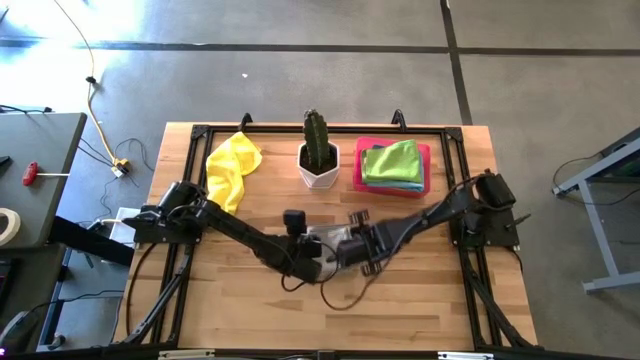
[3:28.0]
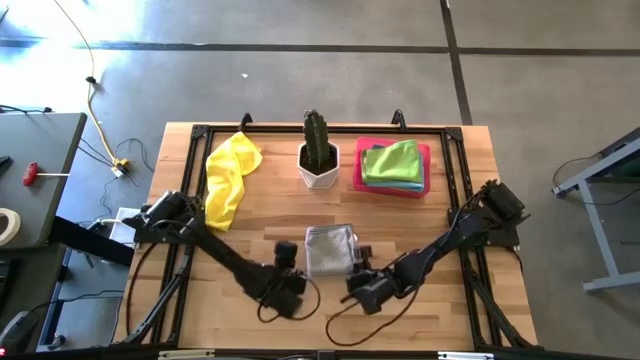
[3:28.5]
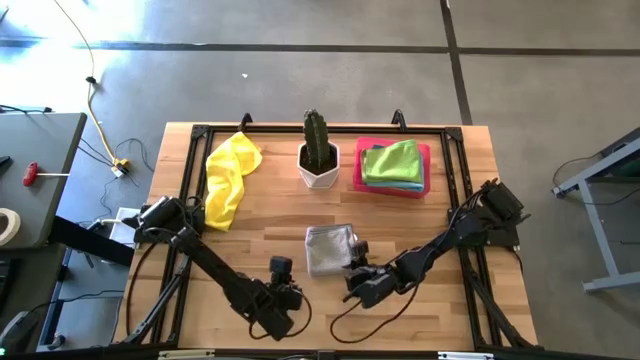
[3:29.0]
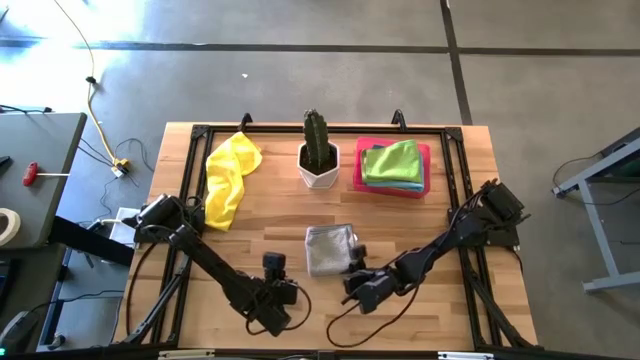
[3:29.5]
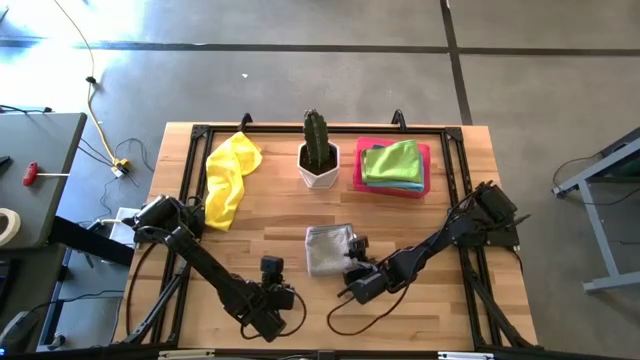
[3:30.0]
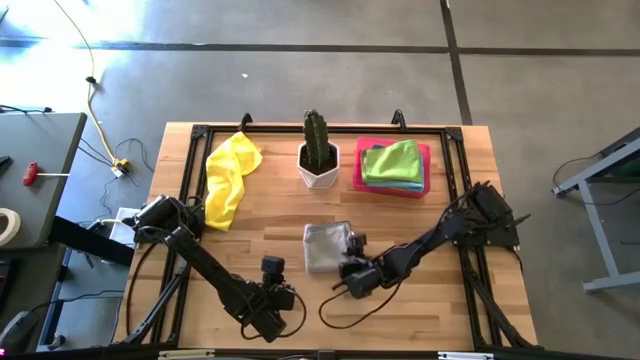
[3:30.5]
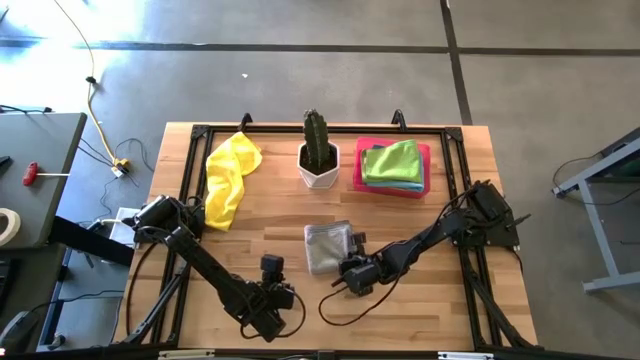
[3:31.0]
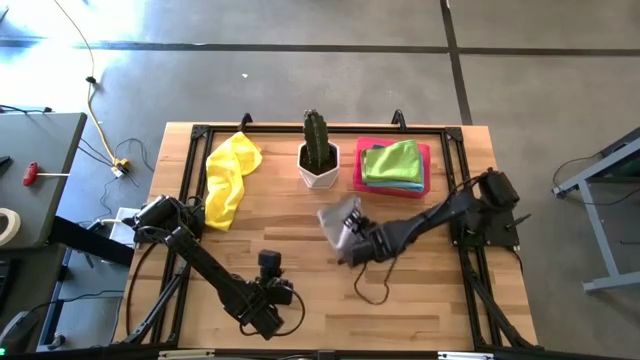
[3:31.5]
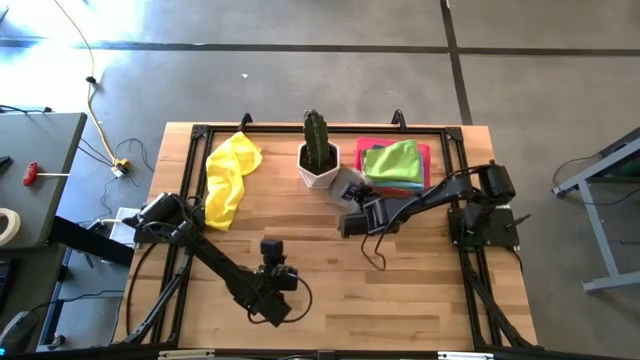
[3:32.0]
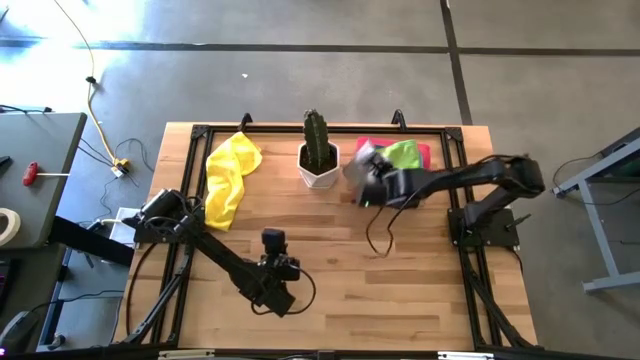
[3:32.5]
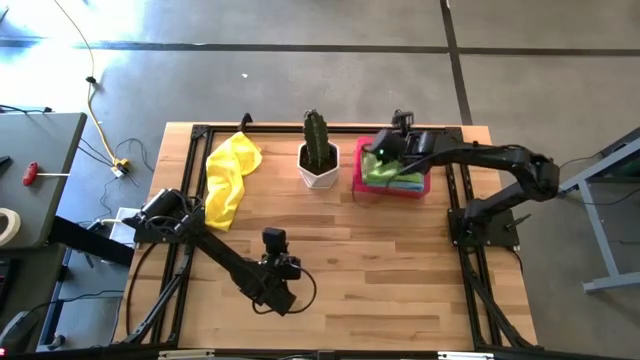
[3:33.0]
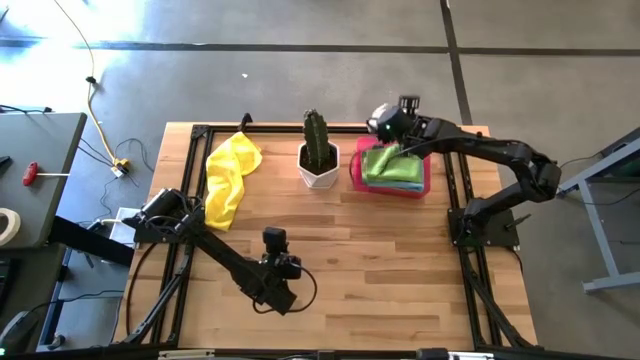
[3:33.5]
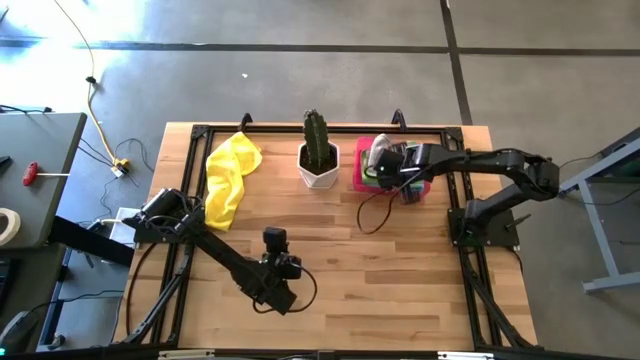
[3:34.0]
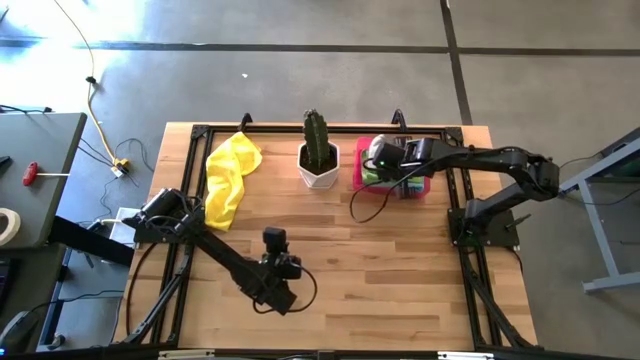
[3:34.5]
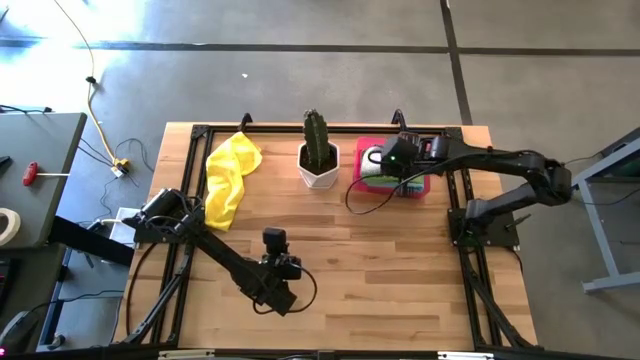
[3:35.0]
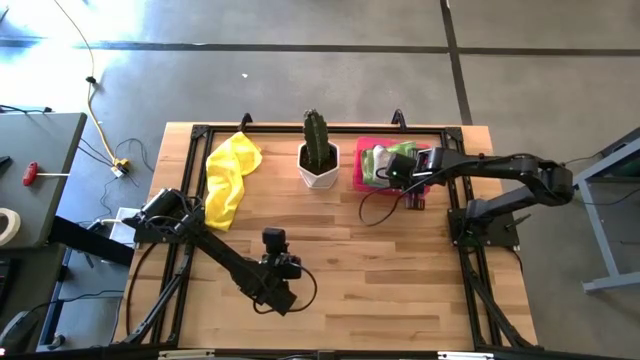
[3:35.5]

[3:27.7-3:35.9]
Task: Fold microfiber towels
Put the gray towel into the pink laundry bin

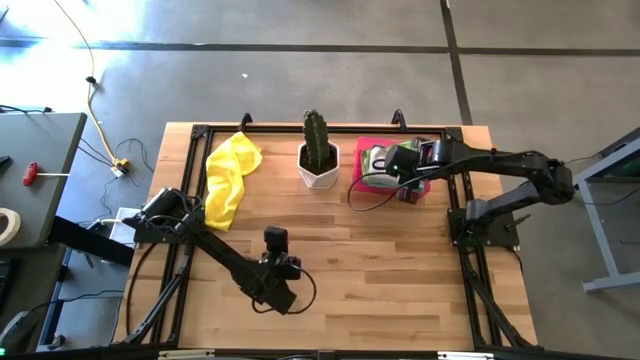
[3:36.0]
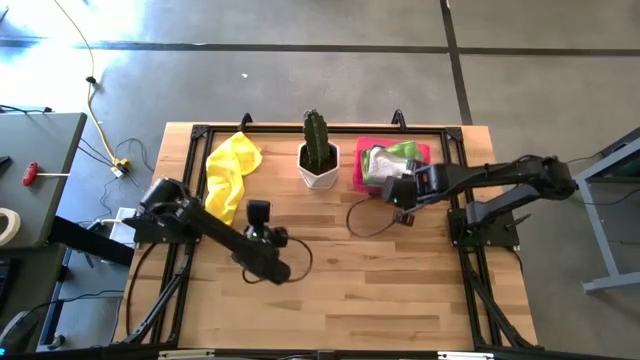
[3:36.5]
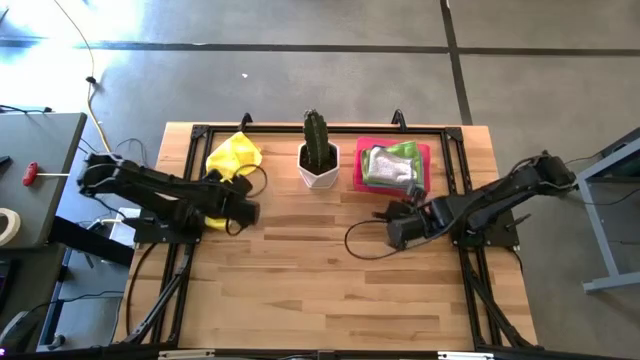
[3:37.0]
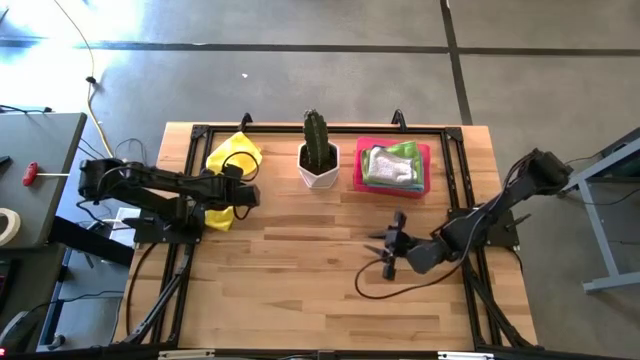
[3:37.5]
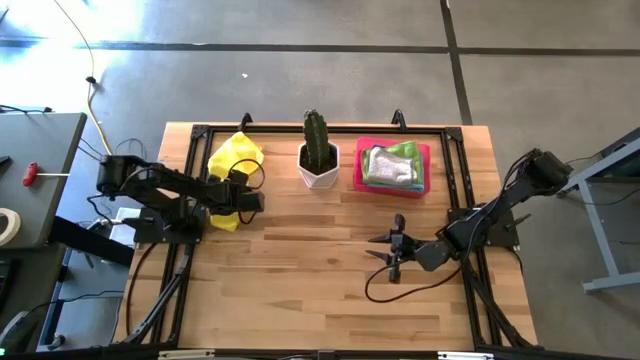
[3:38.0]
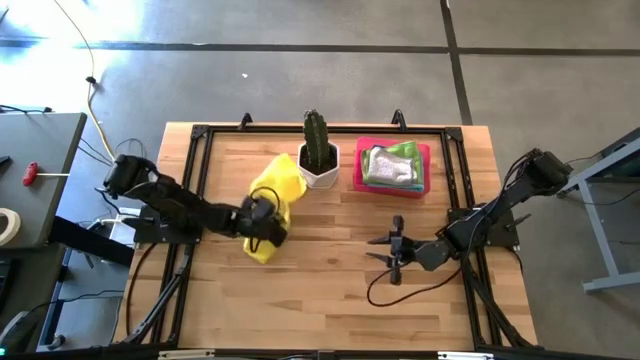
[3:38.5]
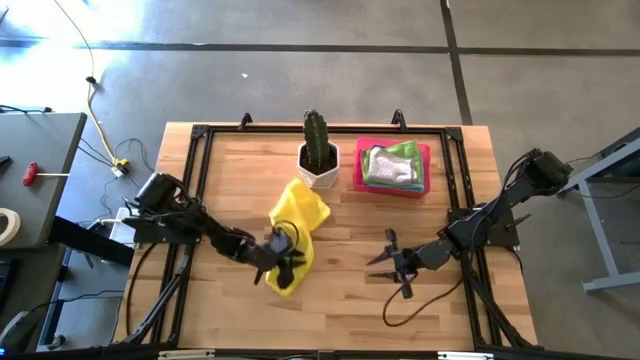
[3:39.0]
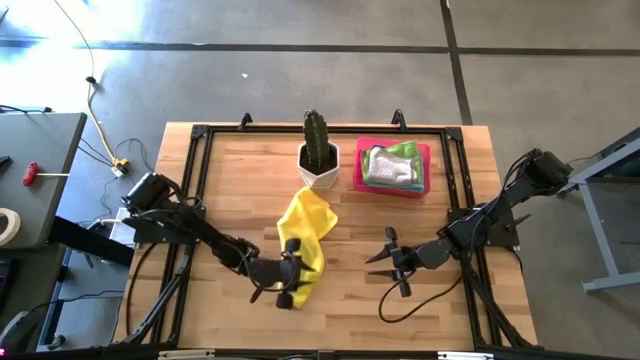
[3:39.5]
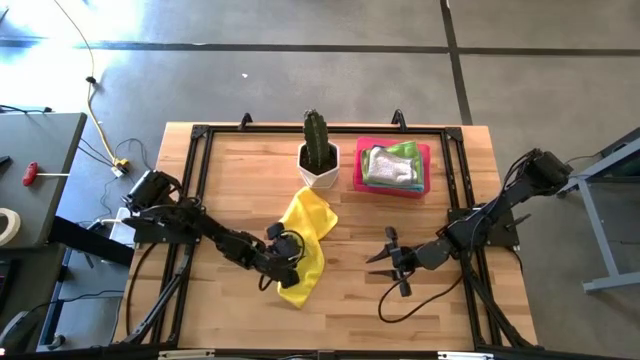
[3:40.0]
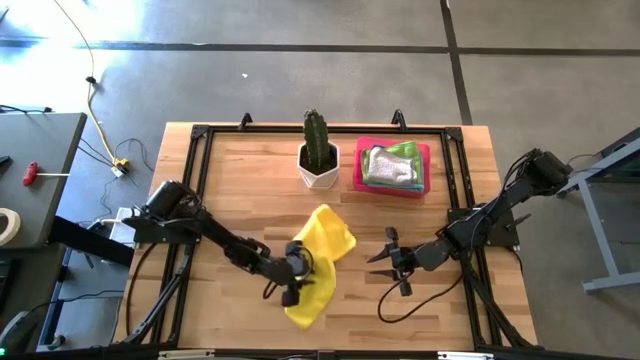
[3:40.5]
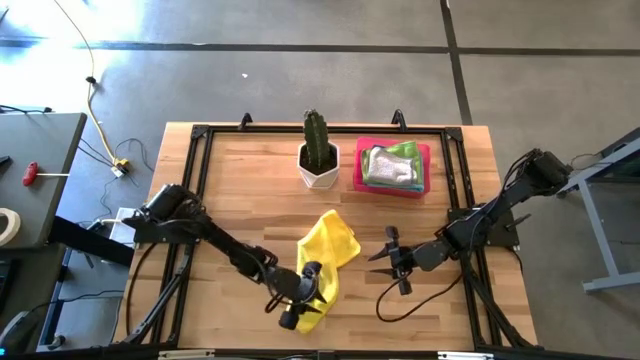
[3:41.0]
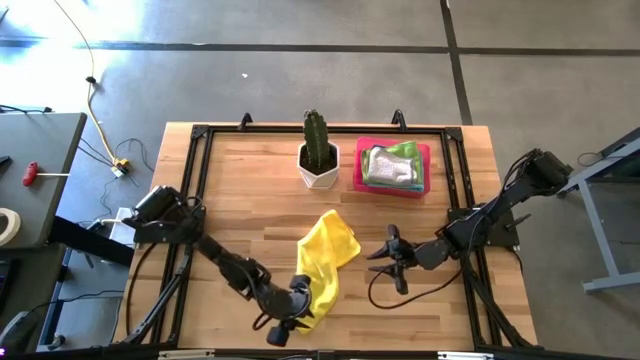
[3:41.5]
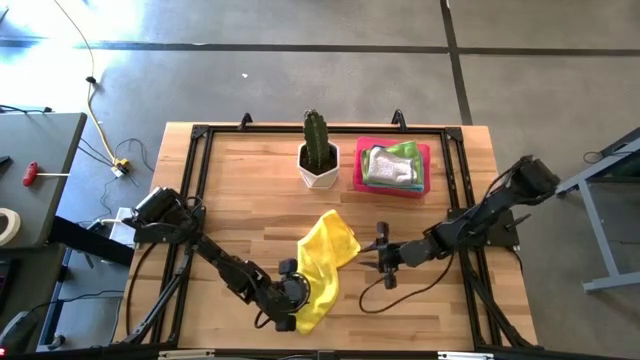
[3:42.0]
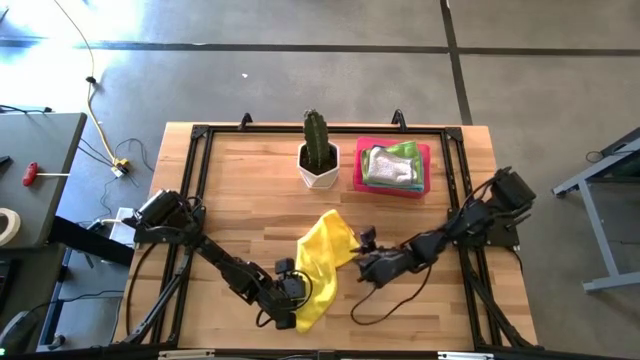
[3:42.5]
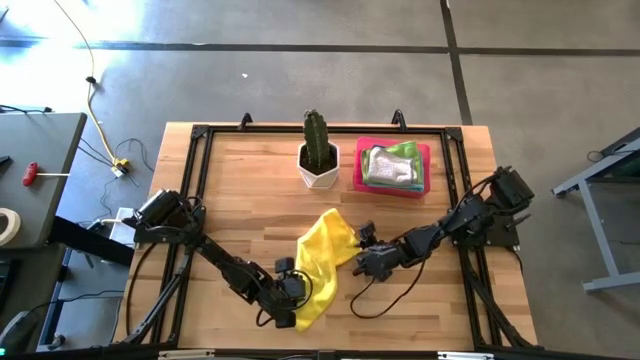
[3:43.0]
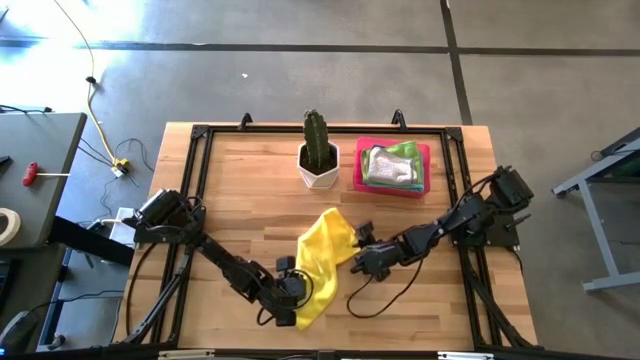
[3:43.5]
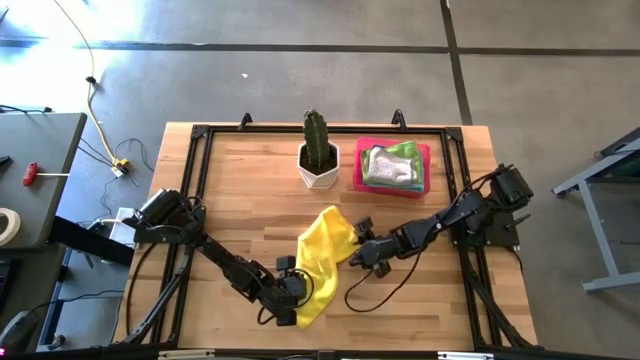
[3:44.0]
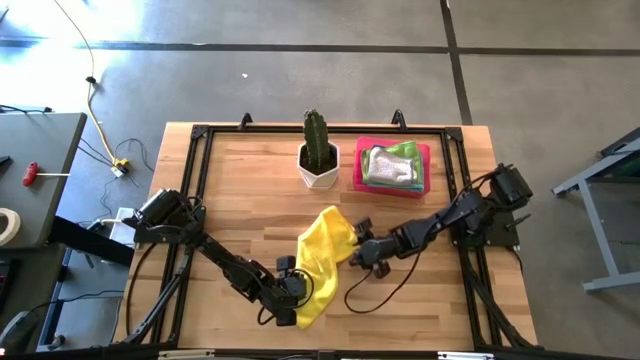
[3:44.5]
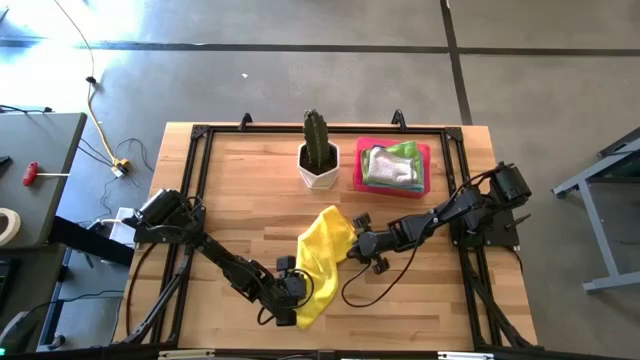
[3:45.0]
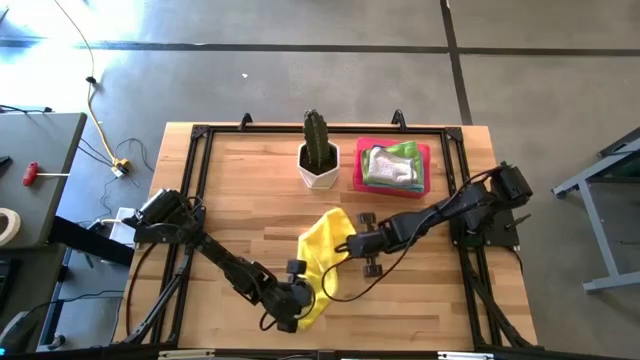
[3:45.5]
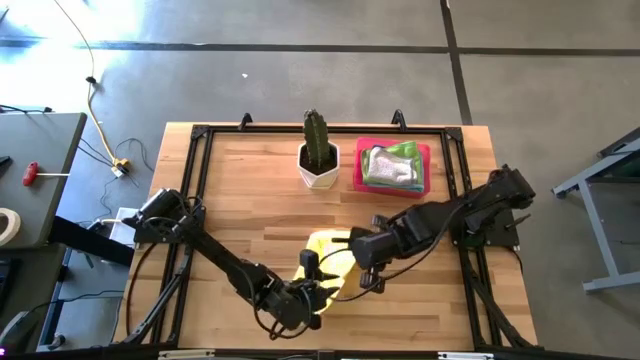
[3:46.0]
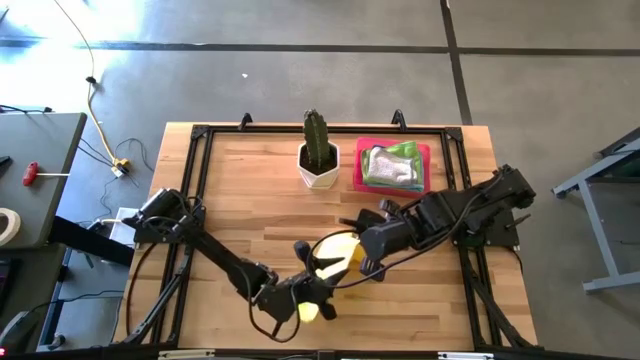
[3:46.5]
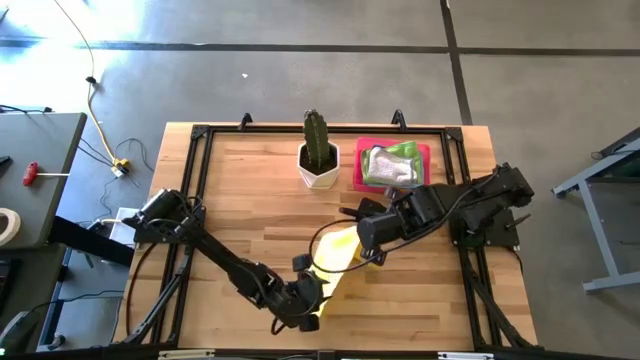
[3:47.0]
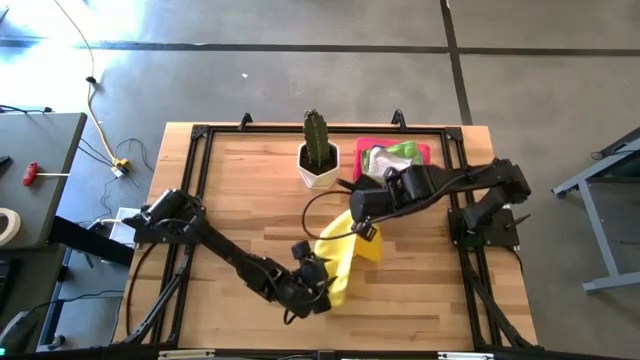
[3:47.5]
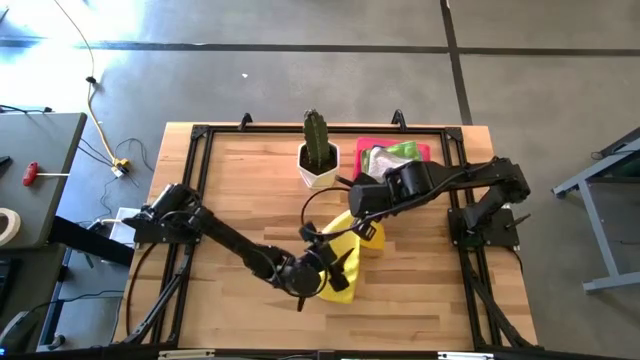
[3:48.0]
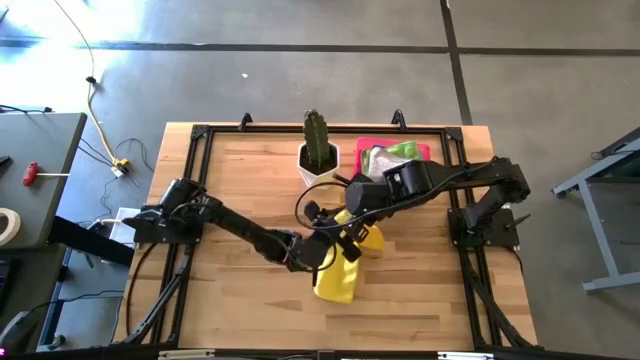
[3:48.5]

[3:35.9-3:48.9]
Fold the yellow towel
